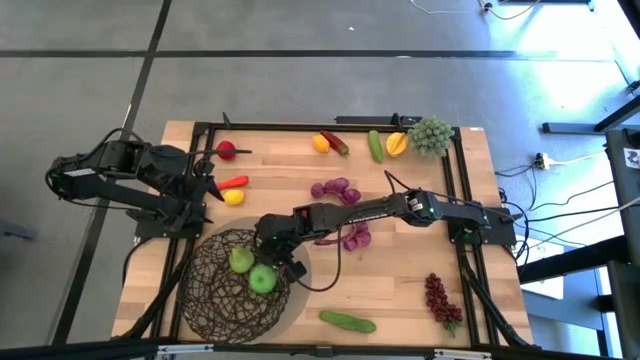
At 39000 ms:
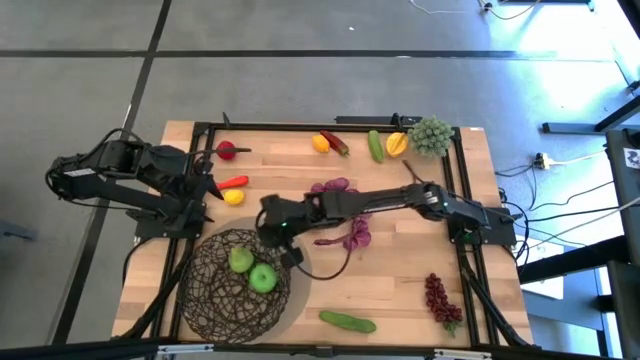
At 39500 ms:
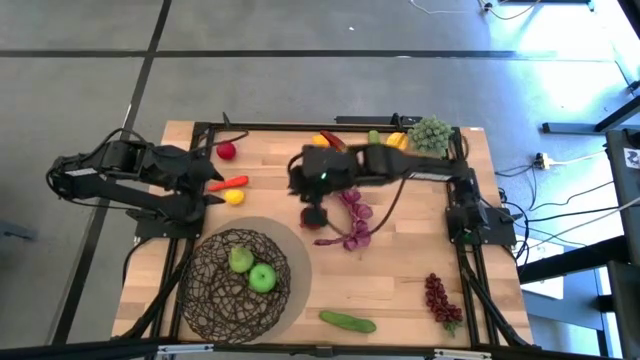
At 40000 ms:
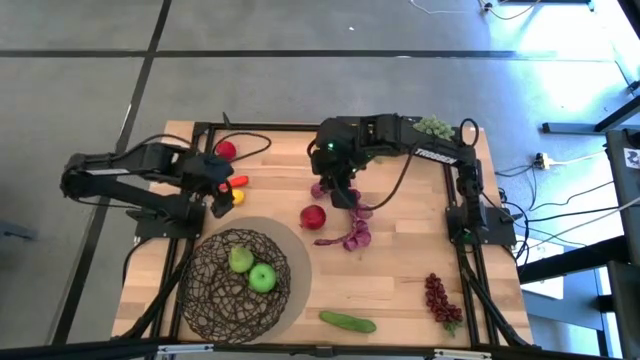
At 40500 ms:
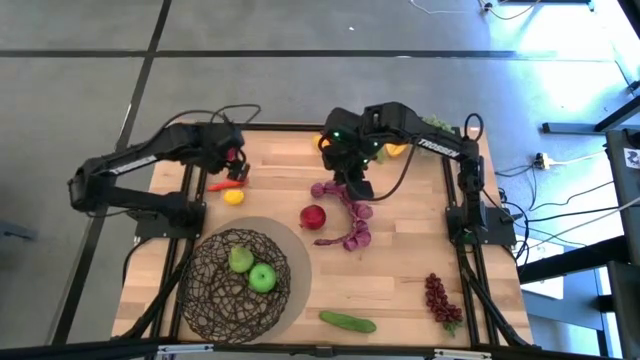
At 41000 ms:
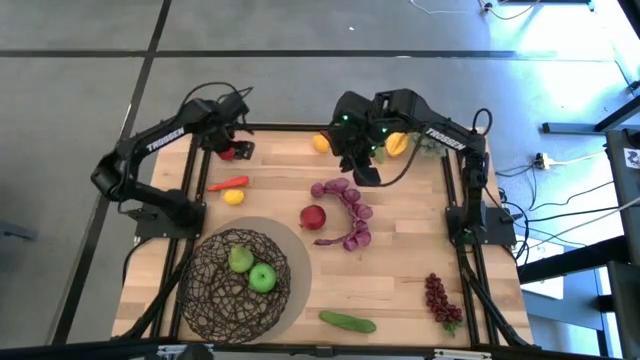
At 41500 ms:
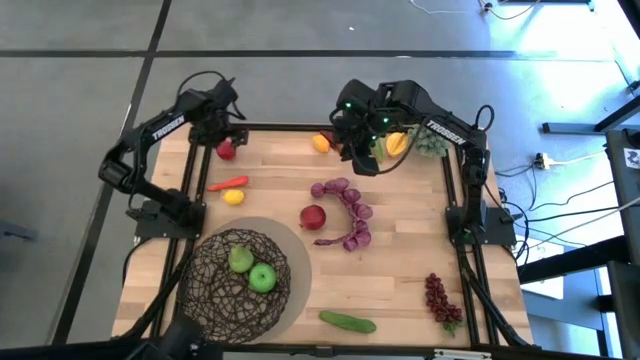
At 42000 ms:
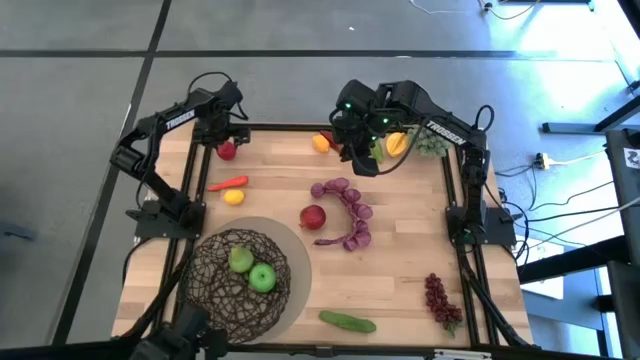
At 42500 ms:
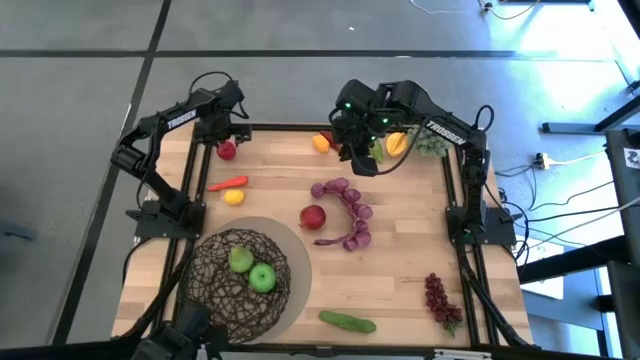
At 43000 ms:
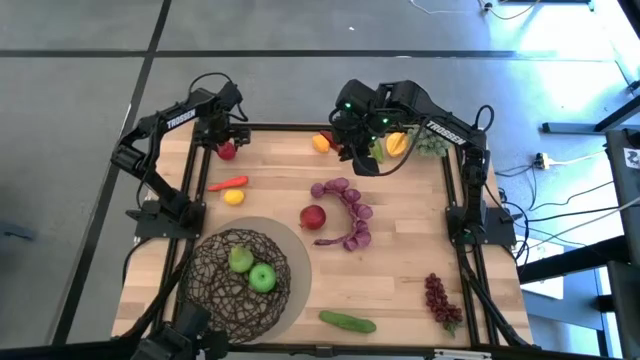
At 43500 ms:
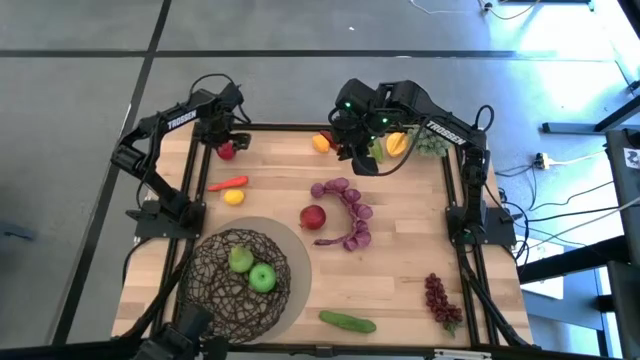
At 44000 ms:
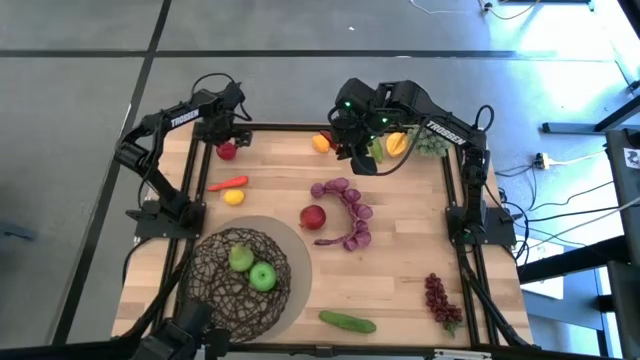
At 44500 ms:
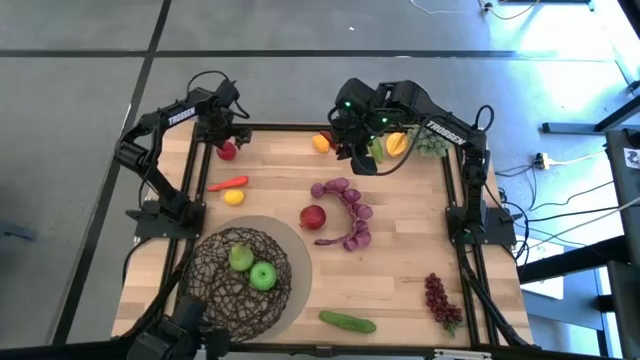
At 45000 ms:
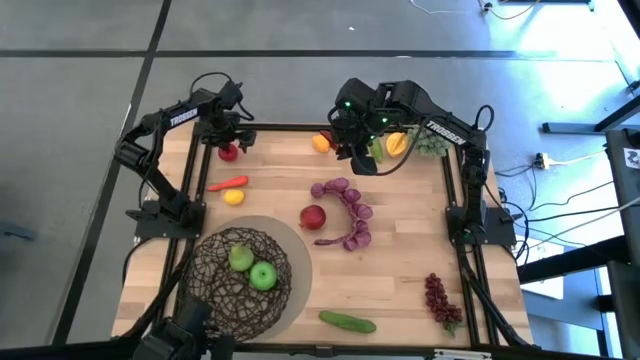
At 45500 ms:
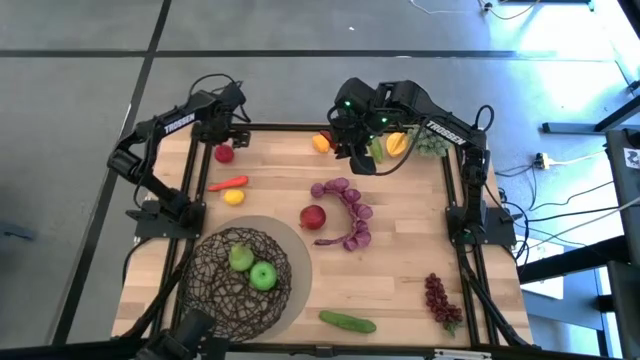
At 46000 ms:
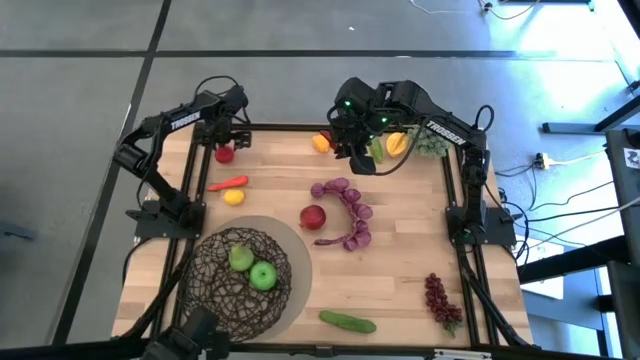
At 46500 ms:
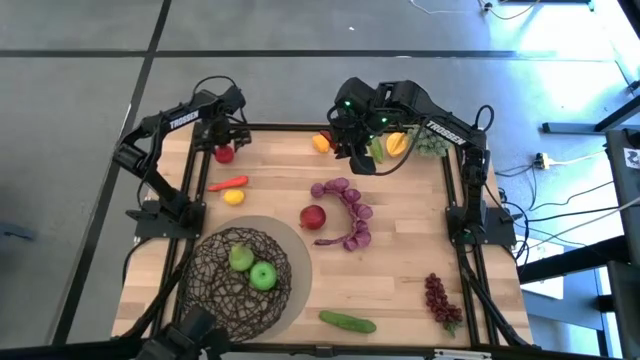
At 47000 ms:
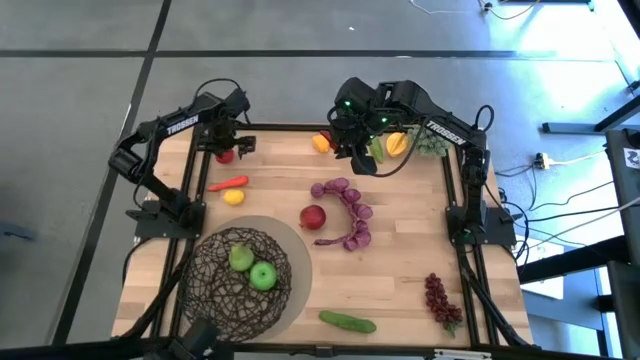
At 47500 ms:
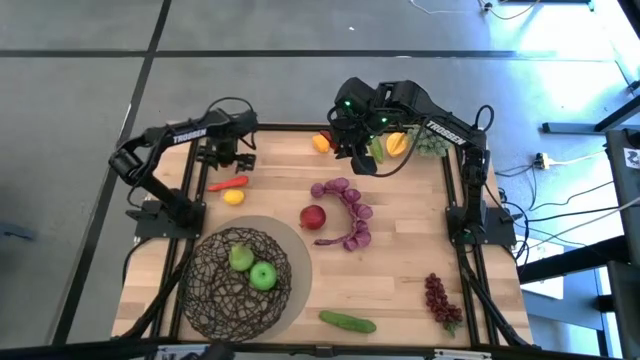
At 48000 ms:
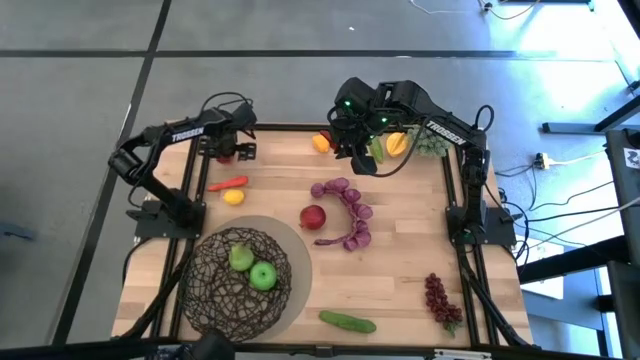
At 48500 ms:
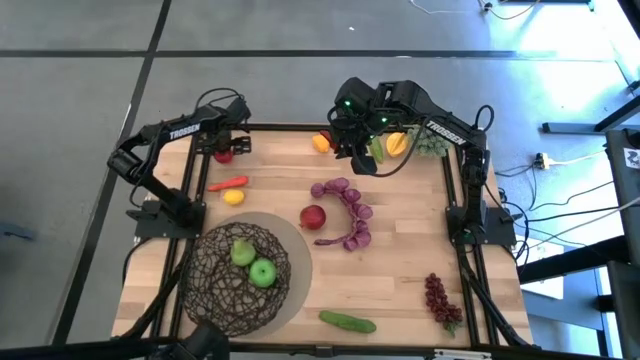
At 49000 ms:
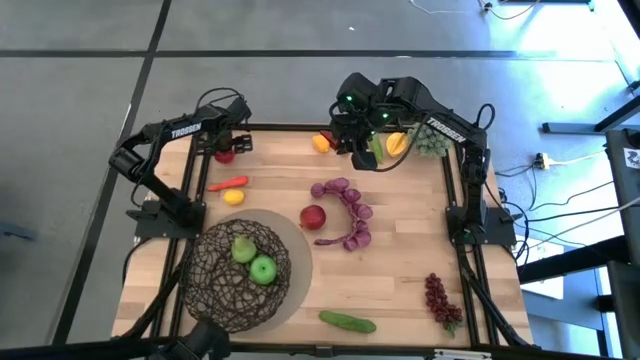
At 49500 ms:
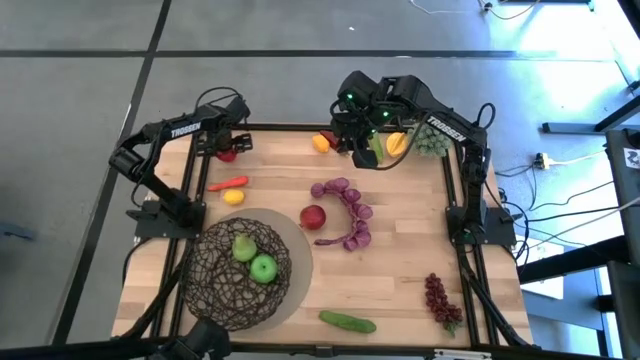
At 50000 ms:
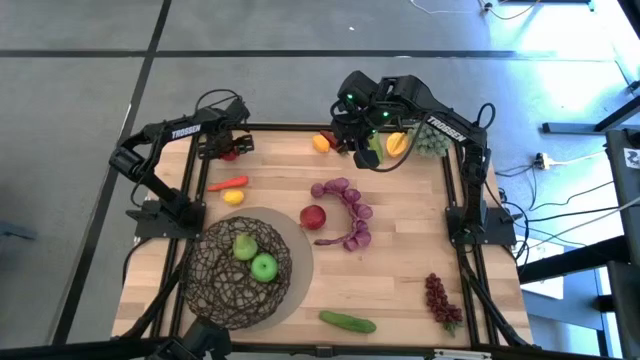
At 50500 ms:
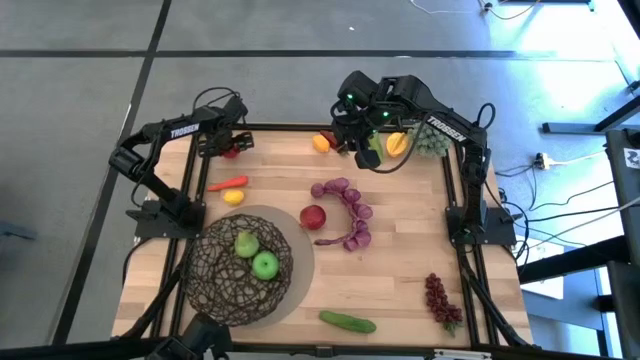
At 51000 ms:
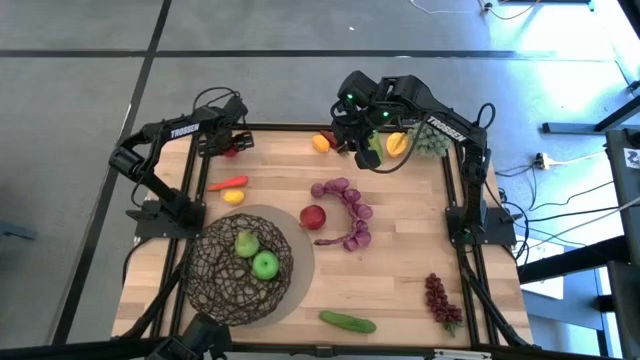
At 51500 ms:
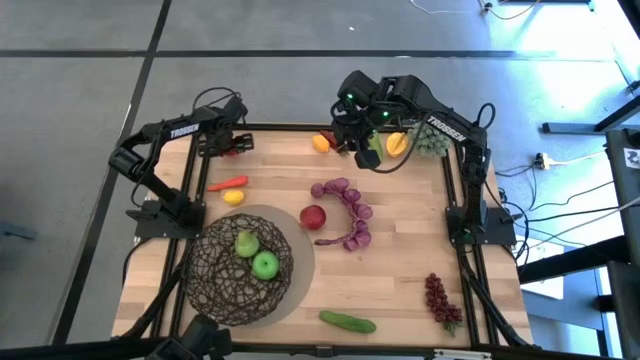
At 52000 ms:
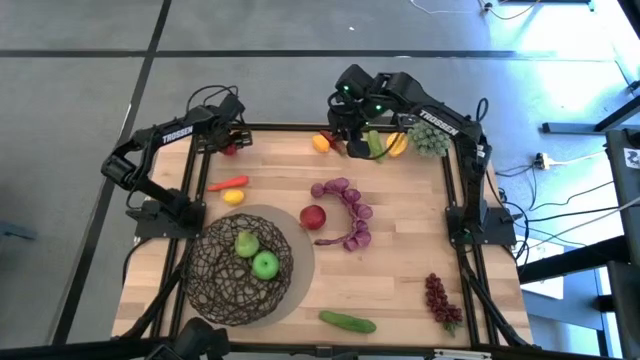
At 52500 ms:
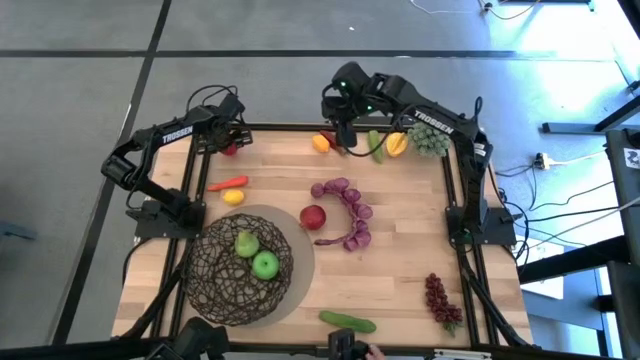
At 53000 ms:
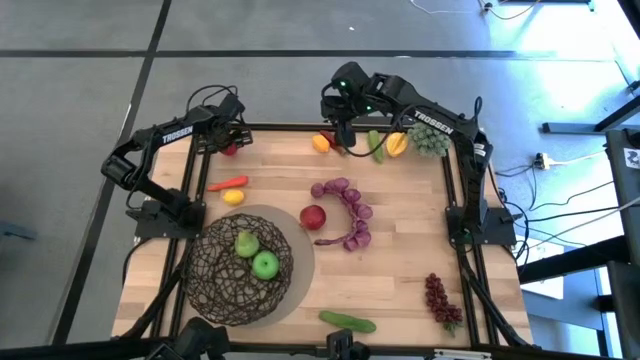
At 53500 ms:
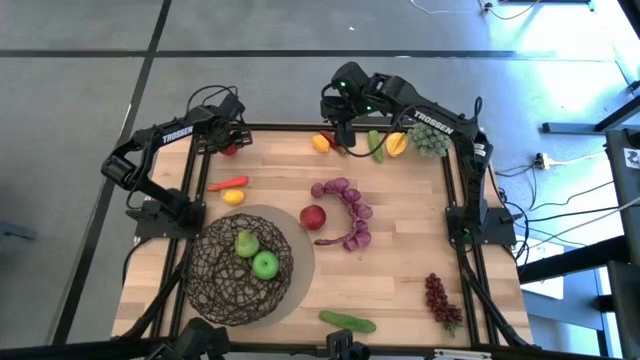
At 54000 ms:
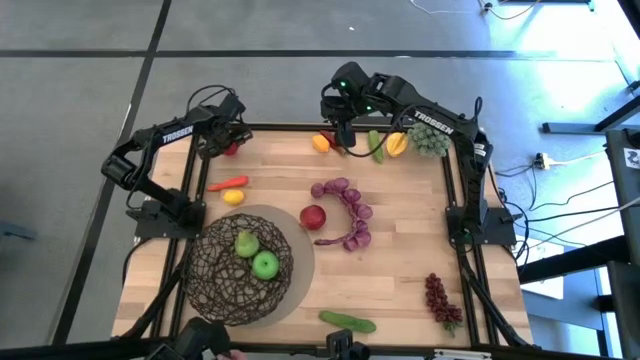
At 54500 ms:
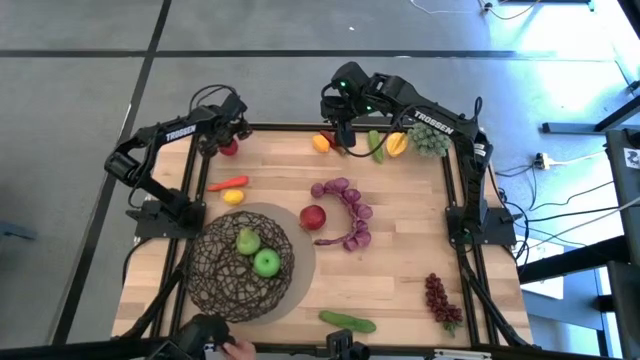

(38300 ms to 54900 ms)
Task: Build produce basket
Put the red tomato into the black wire basket
